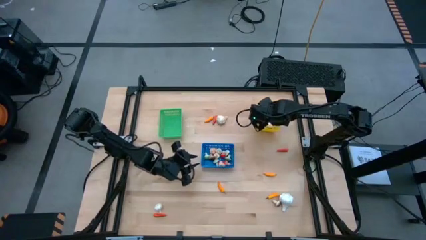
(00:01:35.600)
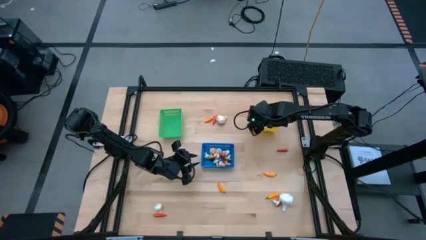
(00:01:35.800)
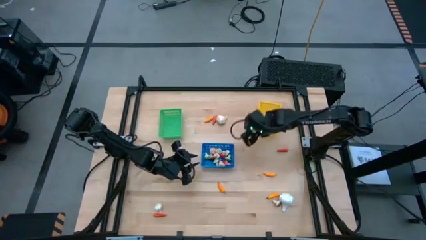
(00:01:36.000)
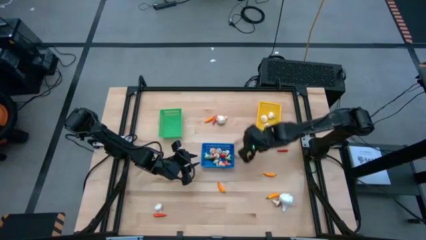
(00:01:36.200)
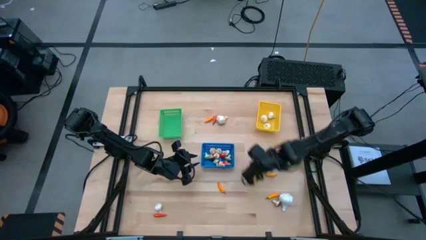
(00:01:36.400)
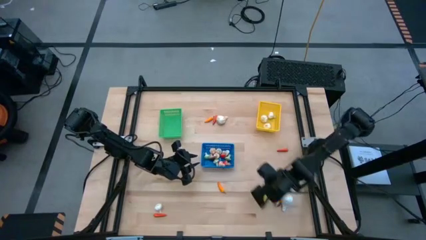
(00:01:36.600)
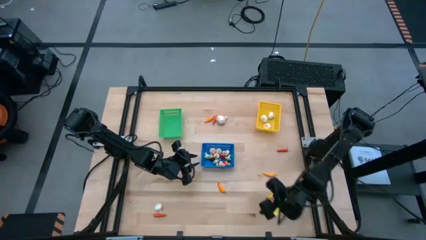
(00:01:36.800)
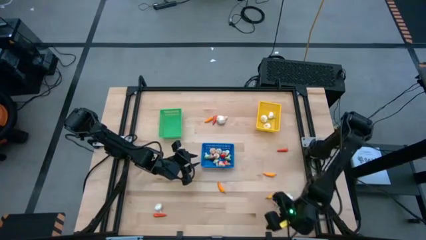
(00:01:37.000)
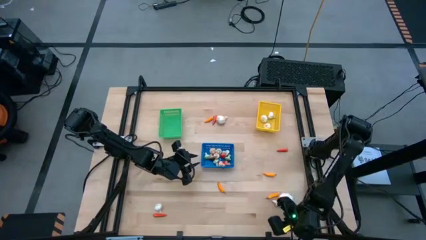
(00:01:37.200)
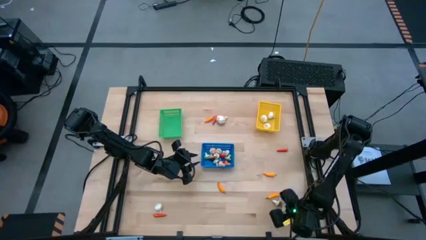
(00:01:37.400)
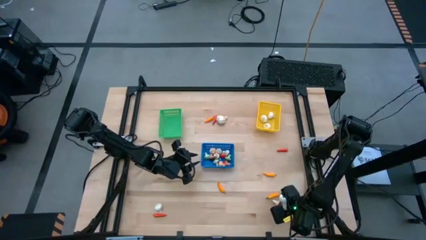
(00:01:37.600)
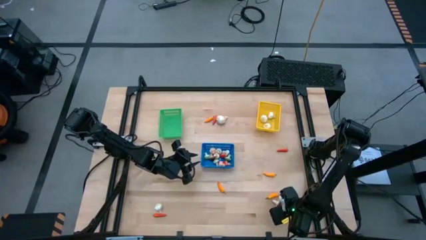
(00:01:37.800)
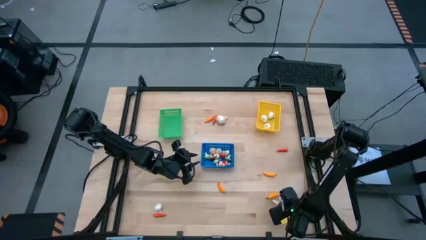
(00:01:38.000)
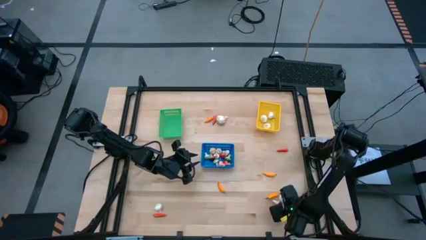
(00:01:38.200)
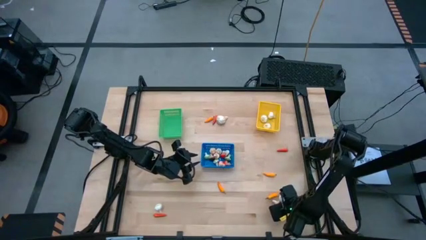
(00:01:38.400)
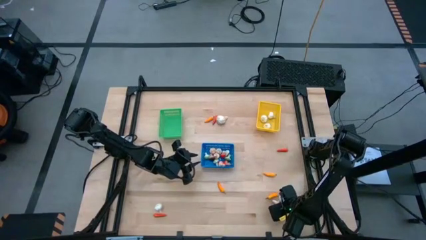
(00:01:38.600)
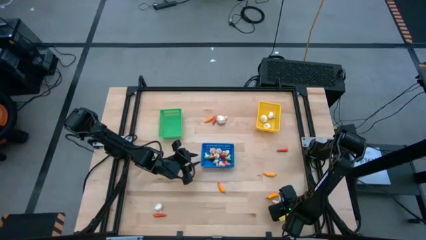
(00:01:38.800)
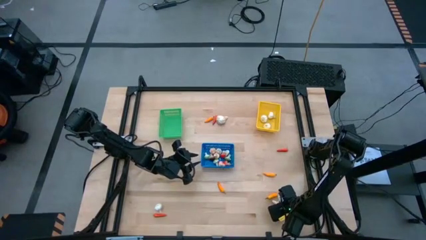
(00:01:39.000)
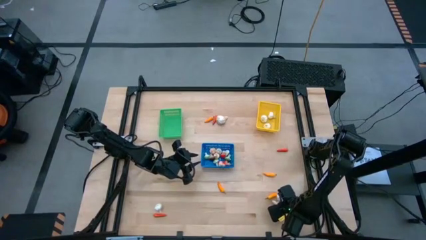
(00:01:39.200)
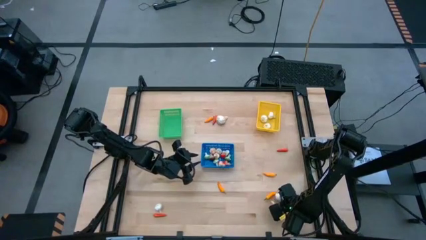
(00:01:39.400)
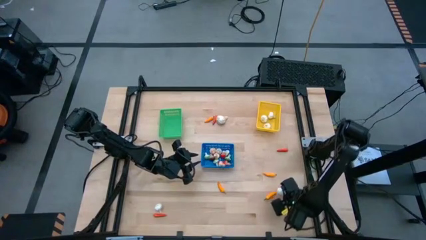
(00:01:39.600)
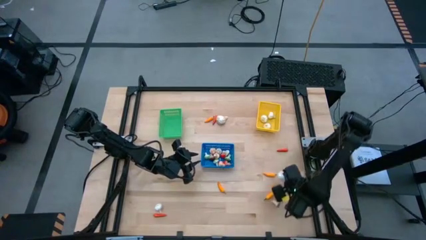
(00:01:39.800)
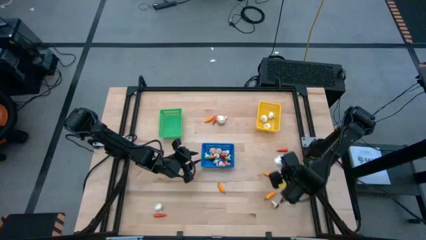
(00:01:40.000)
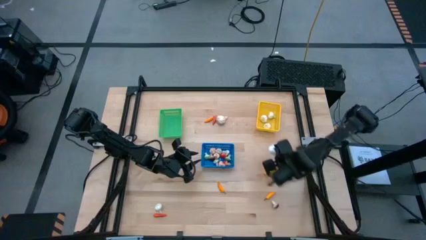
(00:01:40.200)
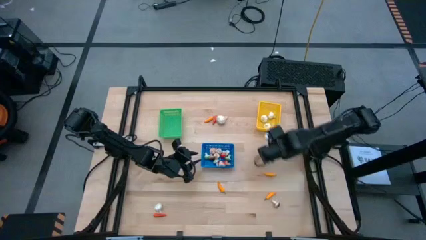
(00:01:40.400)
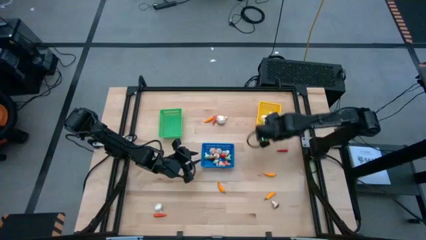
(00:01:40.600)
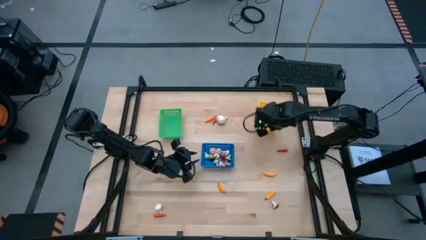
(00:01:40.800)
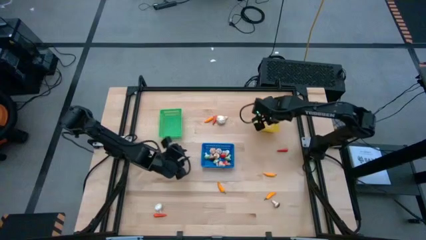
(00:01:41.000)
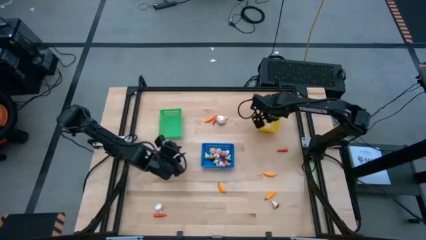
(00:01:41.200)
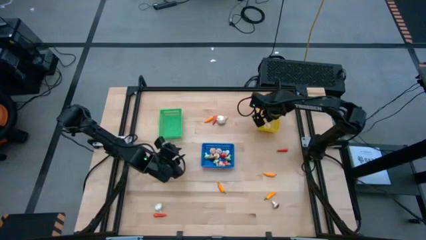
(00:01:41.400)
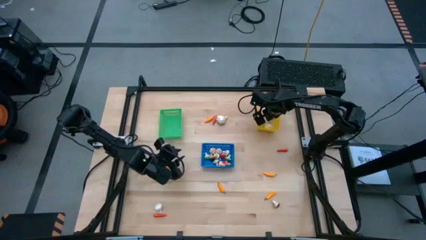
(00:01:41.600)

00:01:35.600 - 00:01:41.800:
Task: Sort produce into baskets
Put the white garlic into the yellow bin

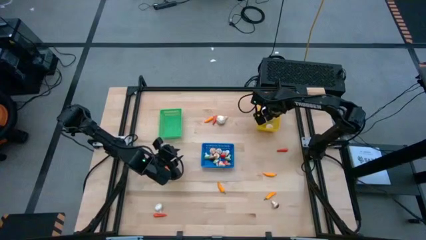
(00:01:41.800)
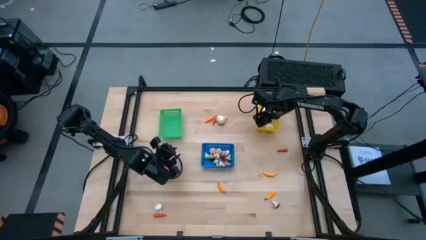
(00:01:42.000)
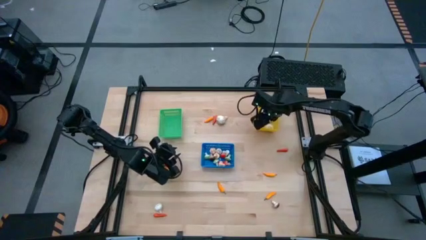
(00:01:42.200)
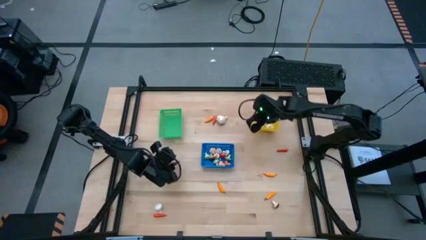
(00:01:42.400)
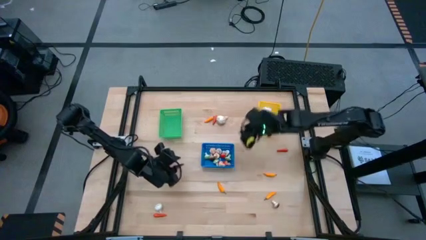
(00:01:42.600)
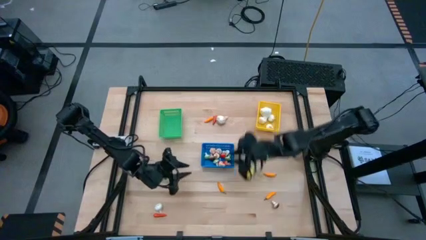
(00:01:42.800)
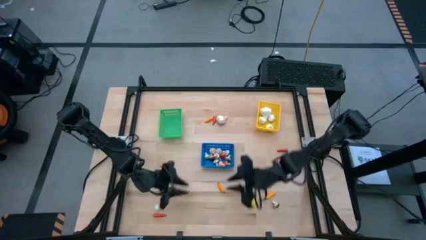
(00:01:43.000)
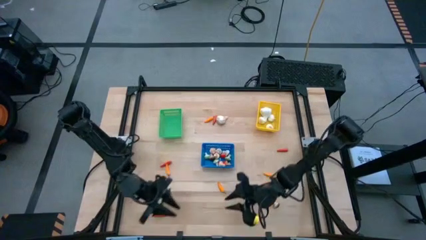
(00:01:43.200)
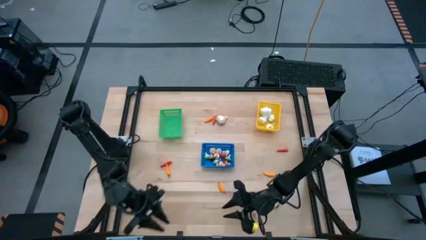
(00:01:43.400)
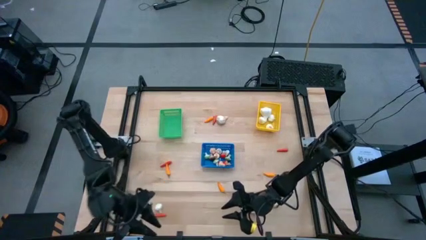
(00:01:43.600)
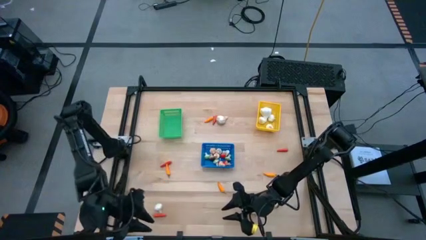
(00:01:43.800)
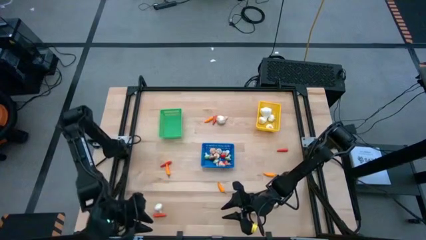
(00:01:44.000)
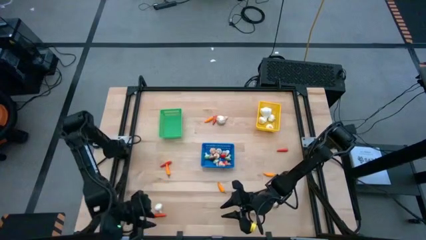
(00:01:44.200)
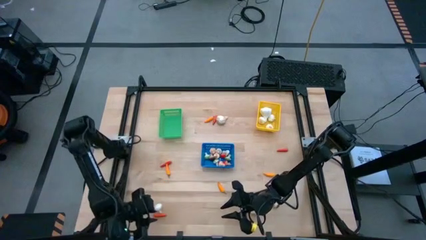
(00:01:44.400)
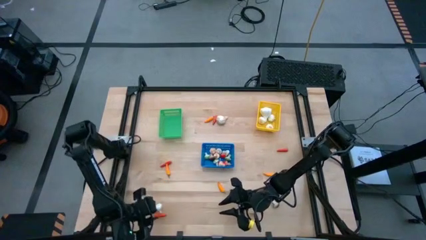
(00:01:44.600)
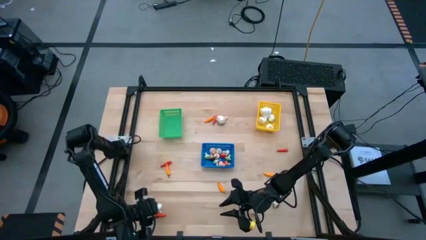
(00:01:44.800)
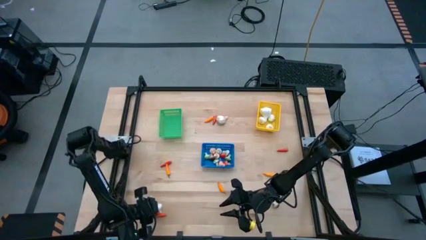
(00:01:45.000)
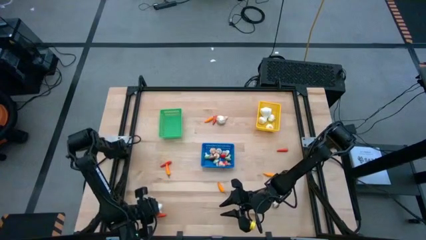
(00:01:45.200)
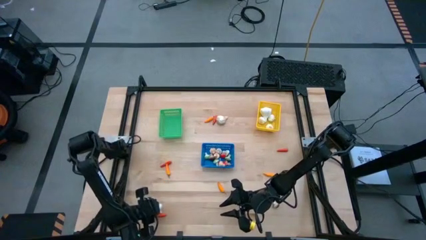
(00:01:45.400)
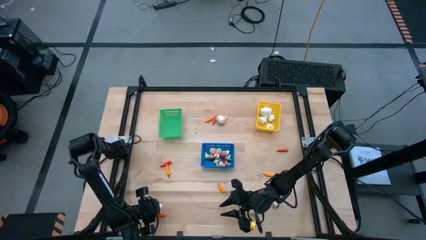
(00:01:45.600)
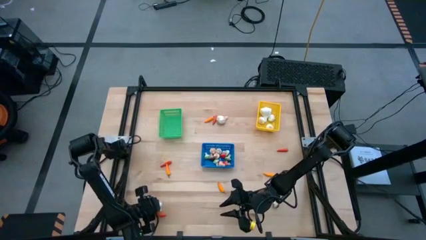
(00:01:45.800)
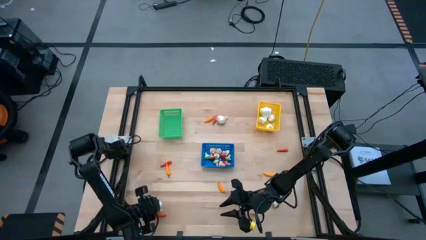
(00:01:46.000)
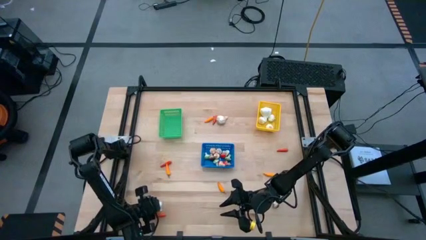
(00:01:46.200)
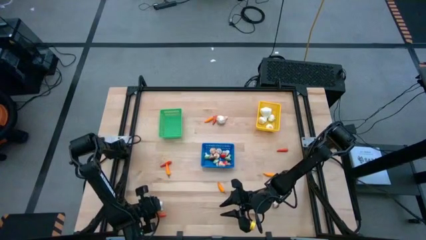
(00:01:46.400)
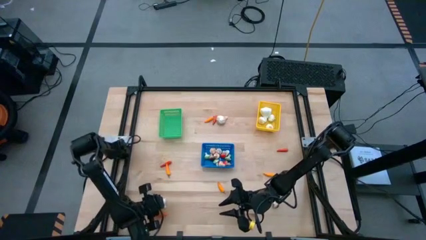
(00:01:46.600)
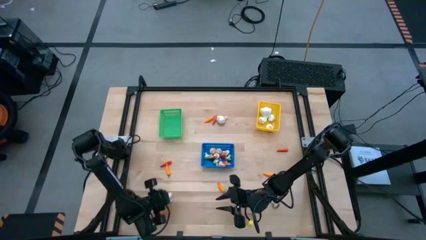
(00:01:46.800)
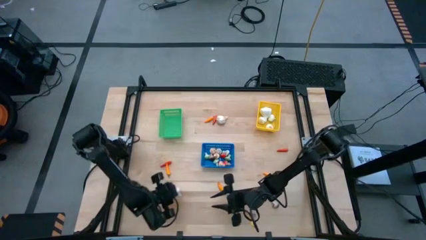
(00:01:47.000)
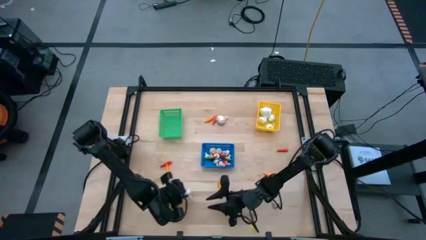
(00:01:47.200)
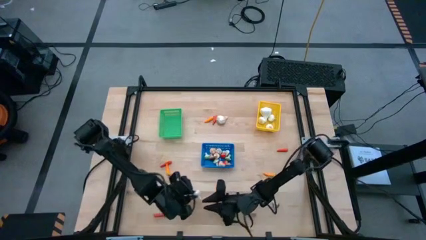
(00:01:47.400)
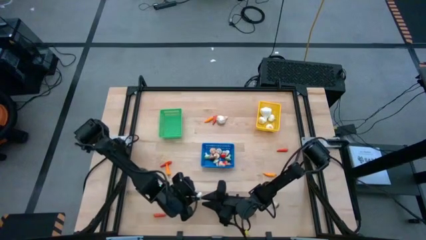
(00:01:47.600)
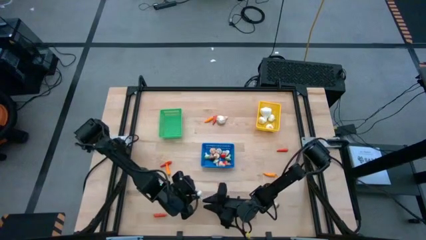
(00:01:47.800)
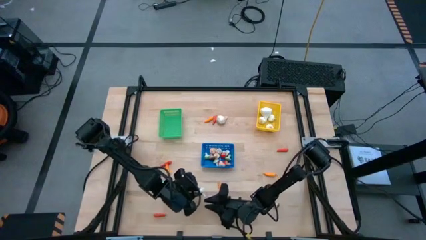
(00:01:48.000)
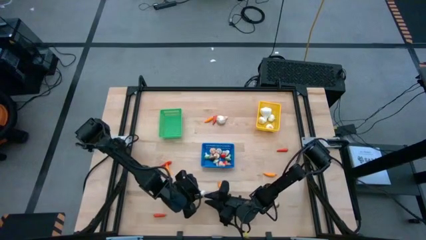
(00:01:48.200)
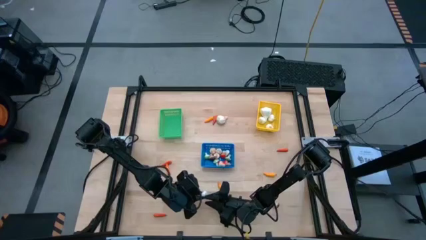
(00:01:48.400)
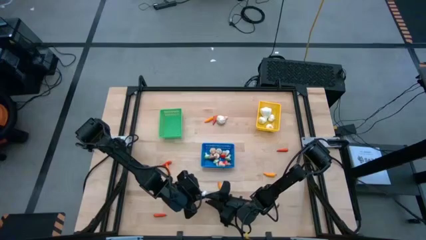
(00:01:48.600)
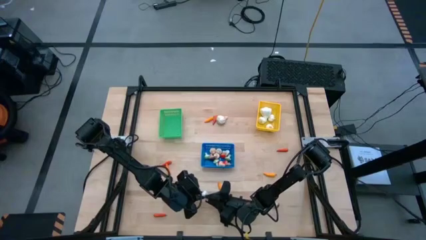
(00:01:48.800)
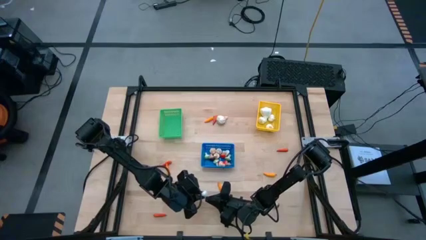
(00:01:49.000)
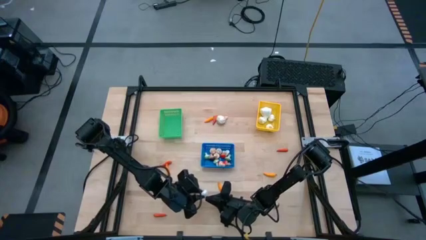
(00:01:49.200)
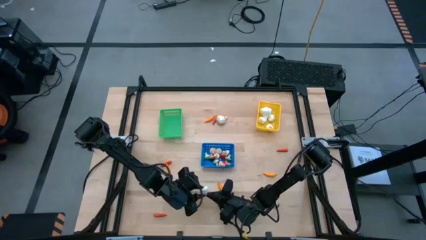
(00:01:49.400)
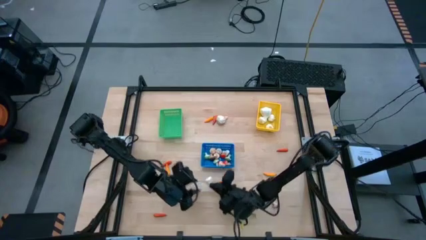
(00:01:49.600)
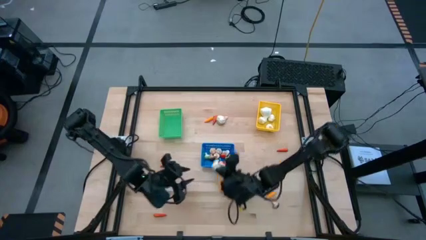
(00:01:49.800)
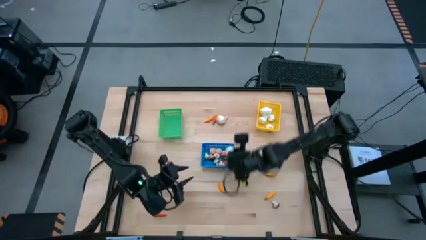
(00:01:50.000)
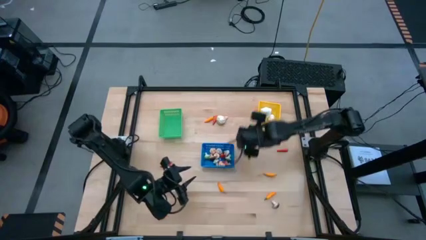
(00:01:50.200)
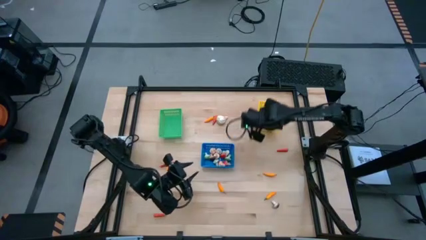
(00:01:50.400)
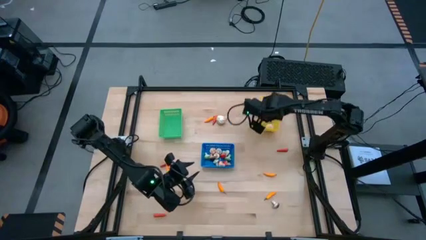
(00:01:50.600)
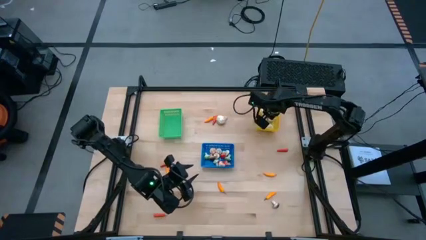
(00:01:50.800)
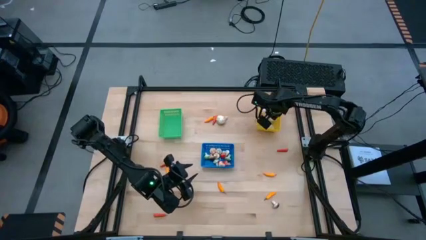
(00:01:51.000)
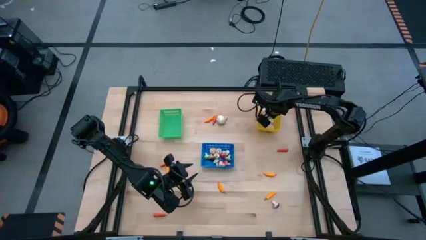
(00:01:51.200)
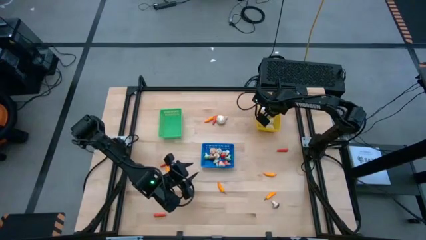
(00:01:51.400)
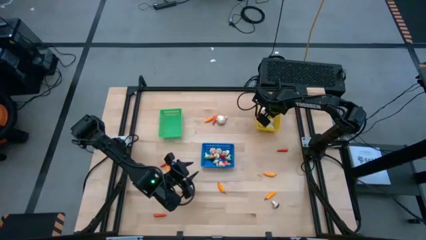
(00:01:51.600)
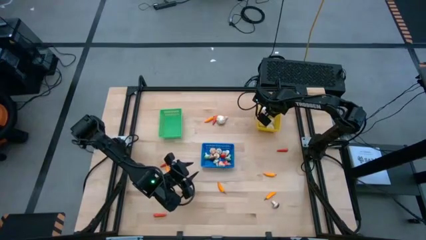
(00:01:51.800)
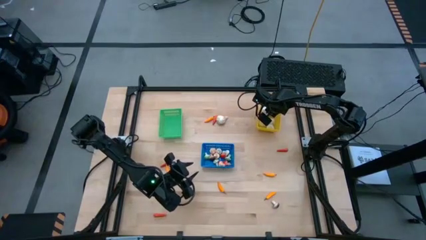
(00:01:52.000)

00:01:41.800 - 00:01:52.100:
Put the white garlic into the yellow bin
